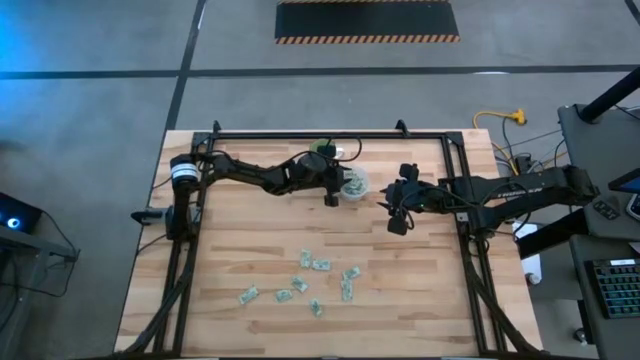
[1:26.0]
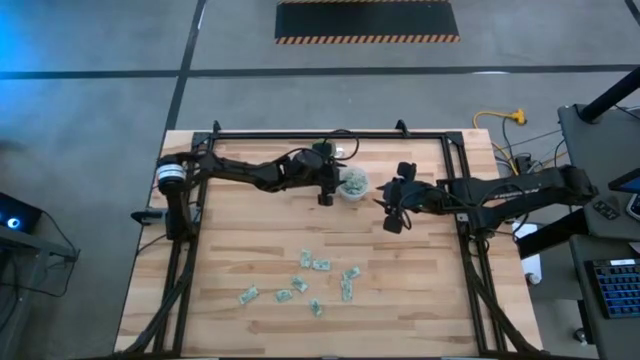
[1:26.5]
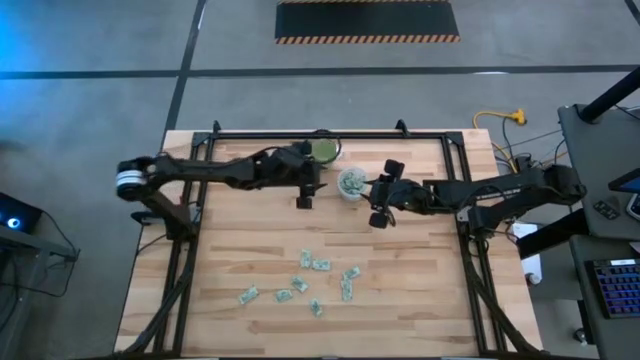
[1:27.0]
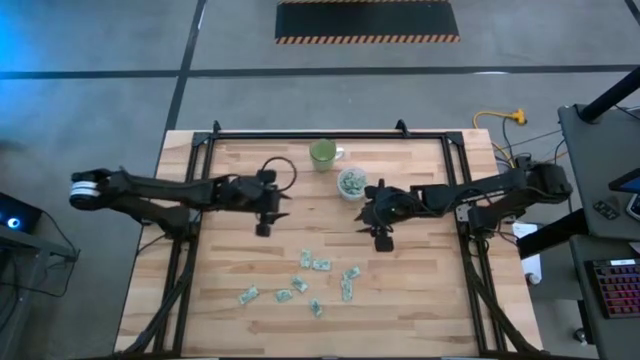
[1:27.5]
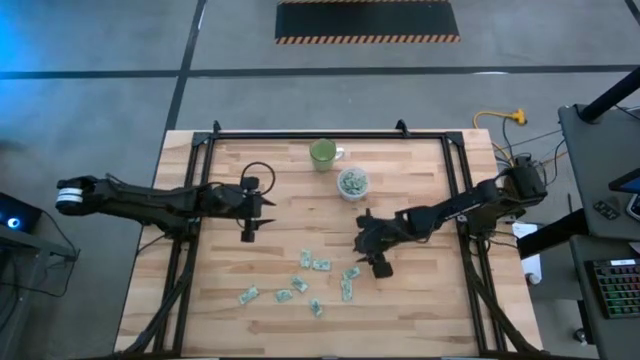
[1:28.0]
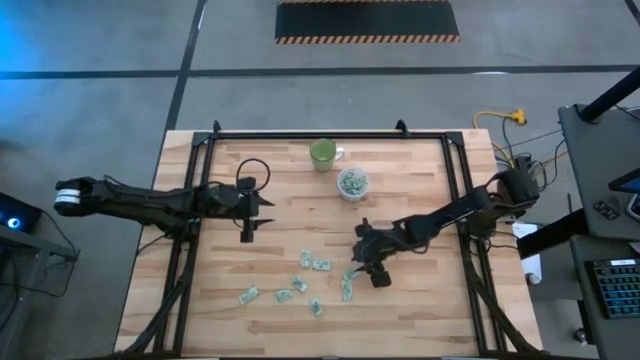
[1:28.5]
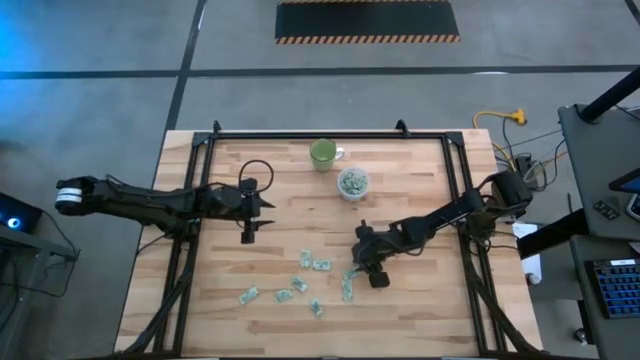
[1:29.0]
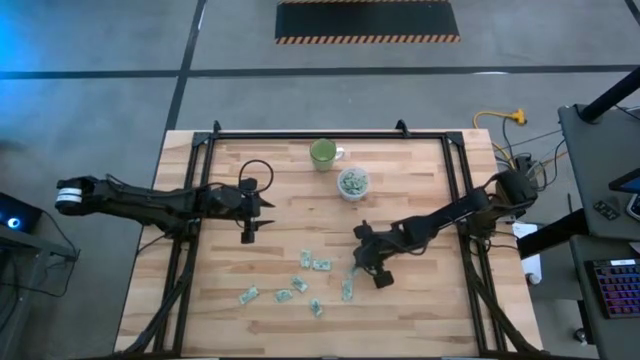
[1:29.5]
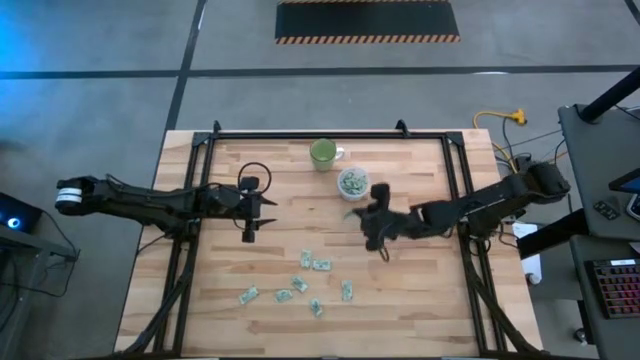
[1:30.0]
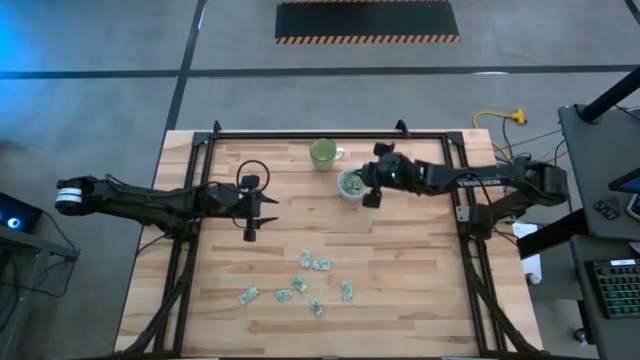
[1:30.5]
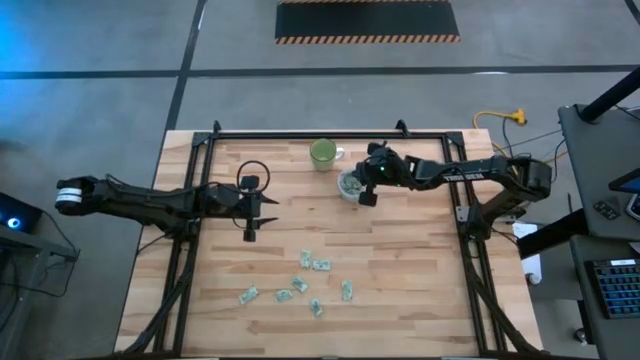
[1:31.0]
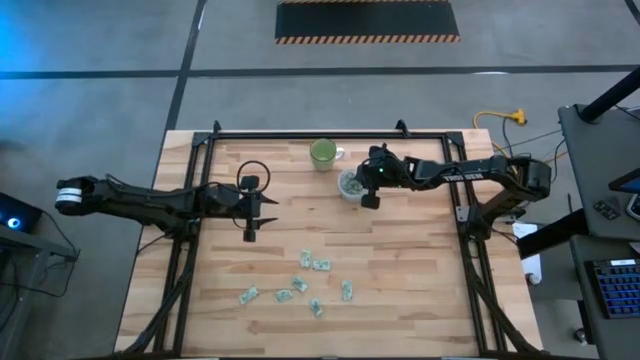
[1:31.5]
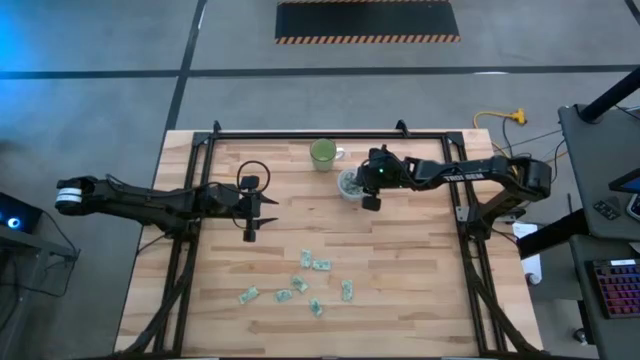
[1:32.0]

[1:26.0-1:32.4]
Task: Pick and place Stevia / Truvia into bins
Put the stevia packet into the transparent container

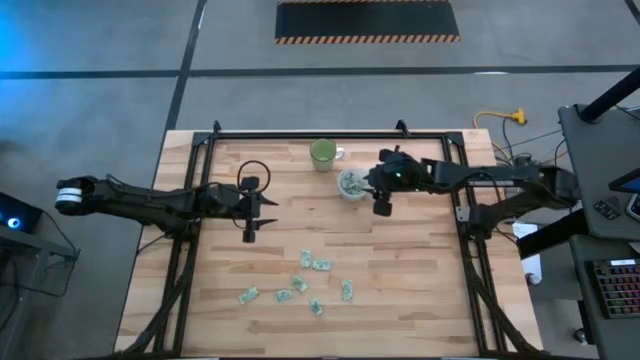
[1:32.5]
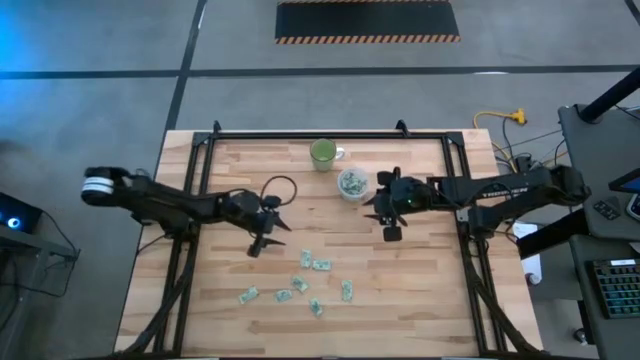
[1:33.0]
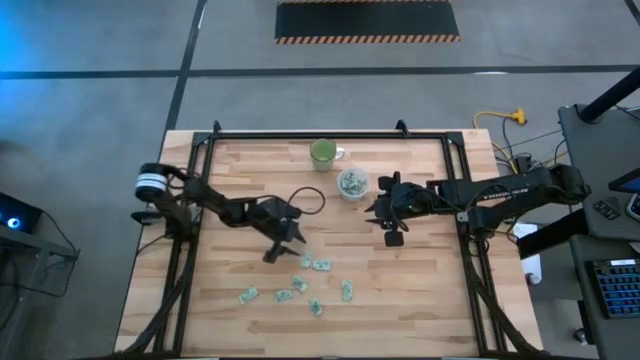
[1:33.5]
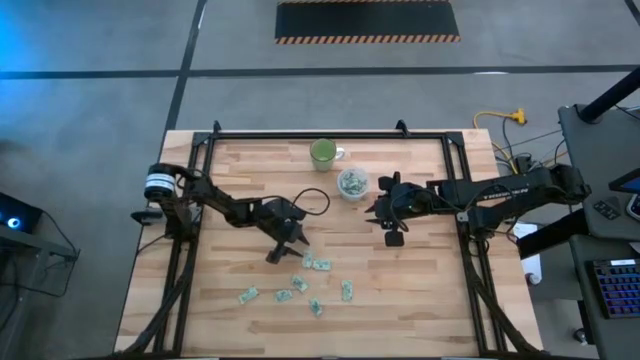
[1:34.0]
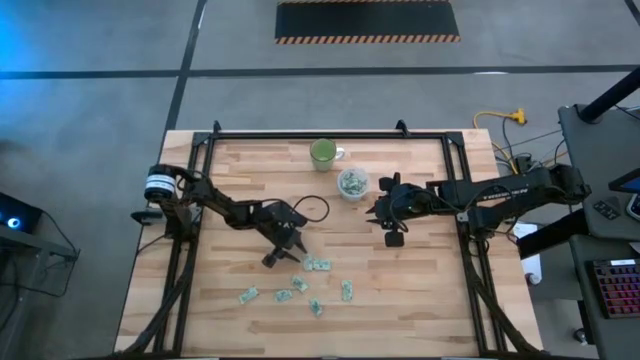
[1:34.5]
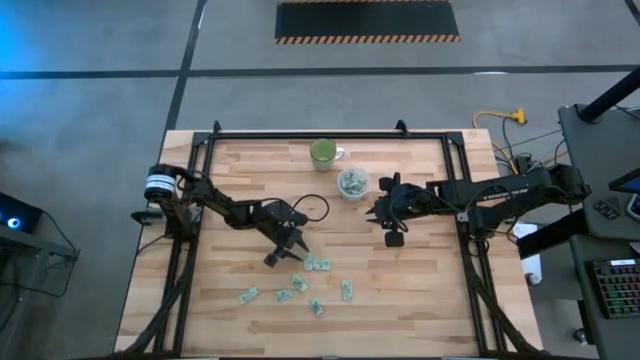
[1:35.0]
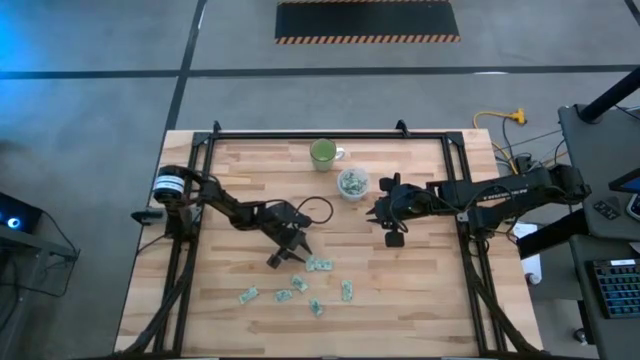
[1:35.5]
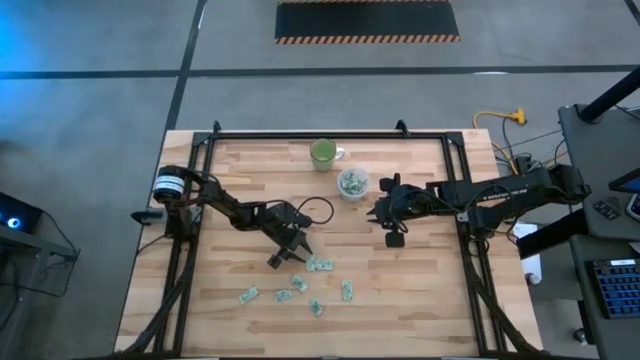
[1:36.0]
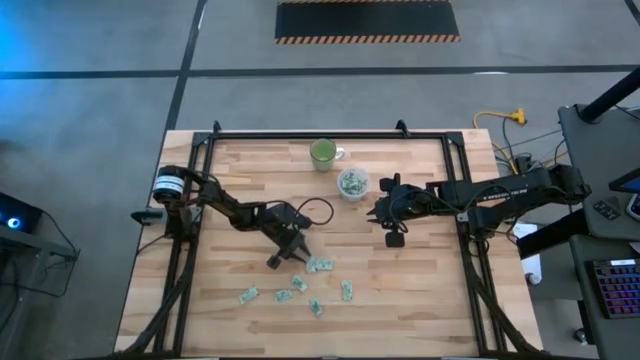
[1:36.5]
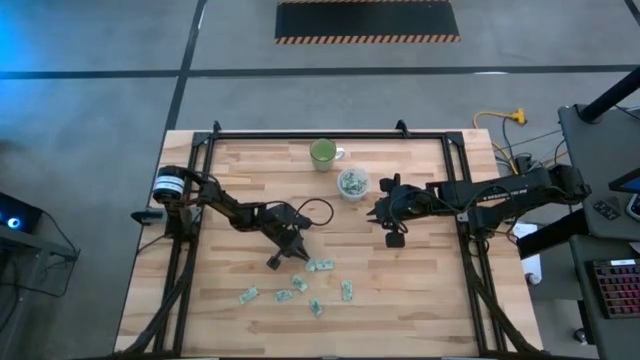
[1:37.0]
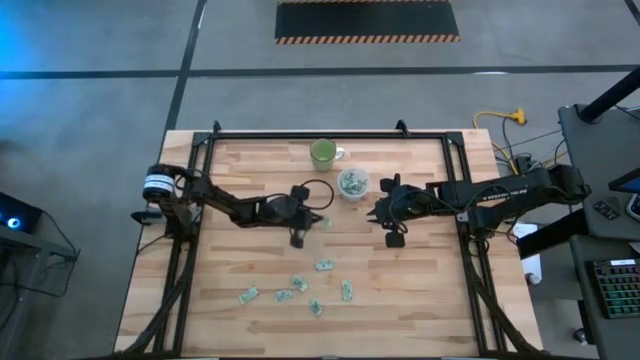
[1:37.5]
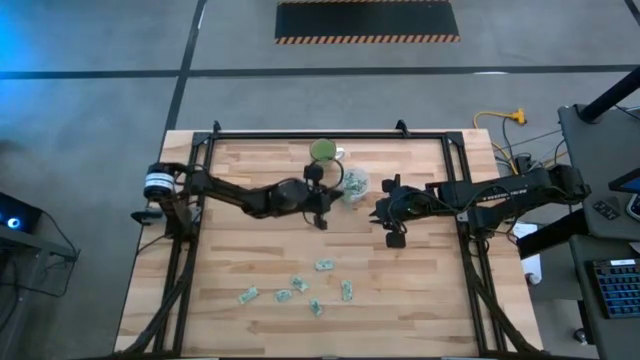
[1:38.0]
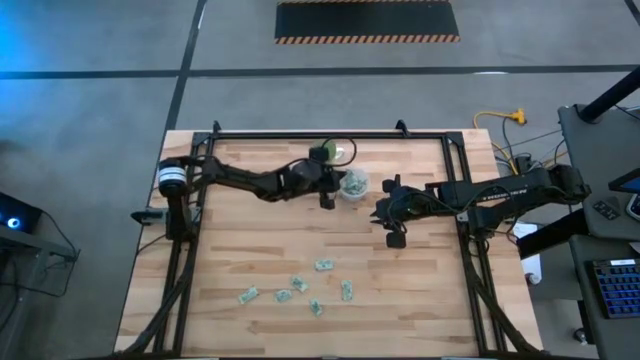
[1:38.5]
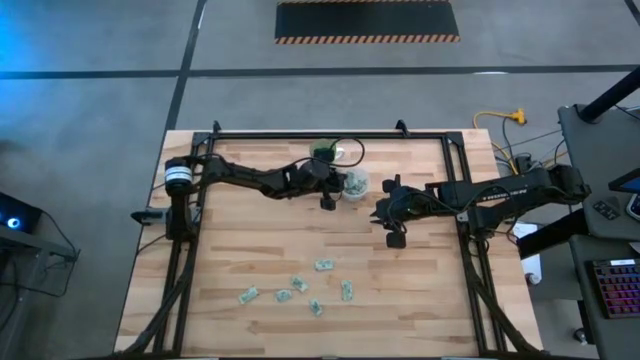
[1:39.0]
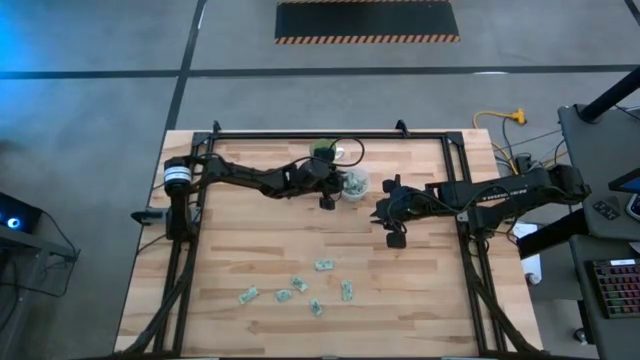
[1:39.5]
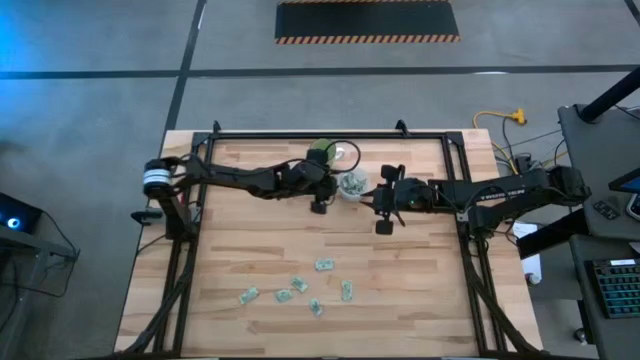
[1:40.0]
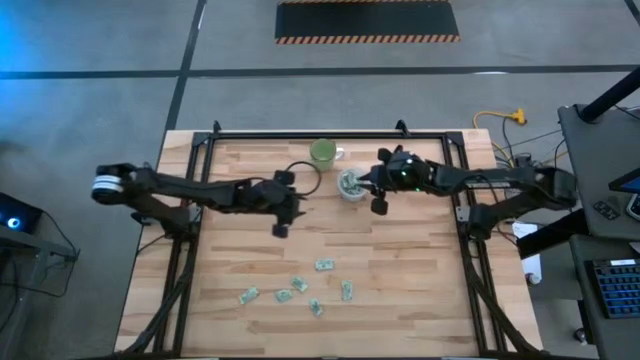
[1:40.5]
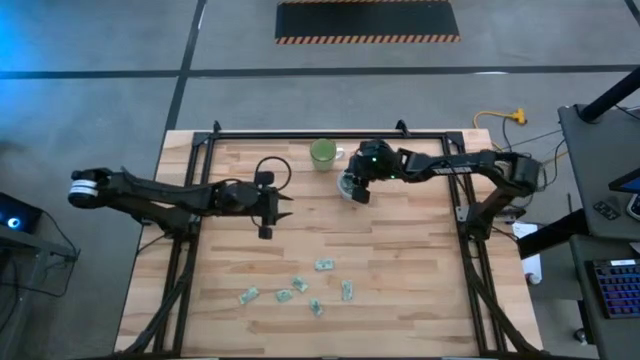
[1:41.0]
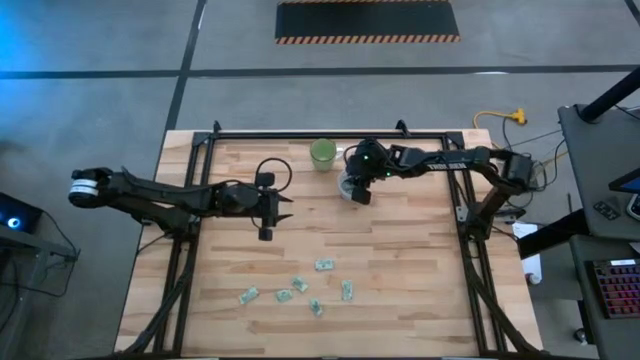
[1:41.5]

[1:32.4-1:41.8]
Put the stevia packet into the transparent container

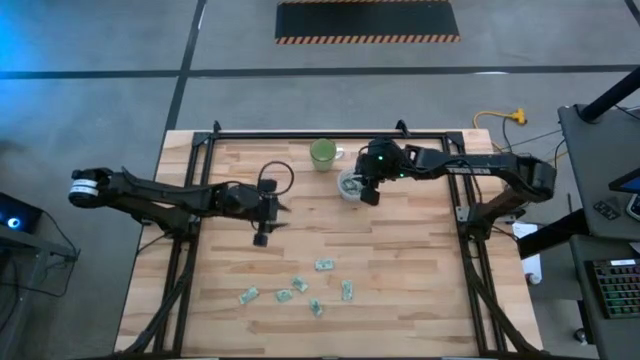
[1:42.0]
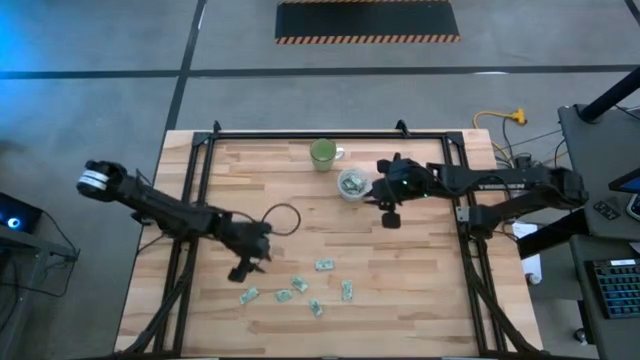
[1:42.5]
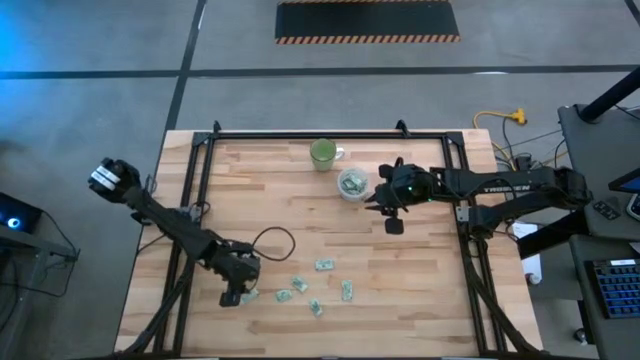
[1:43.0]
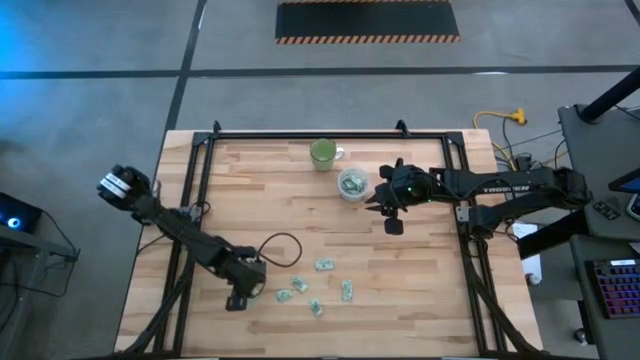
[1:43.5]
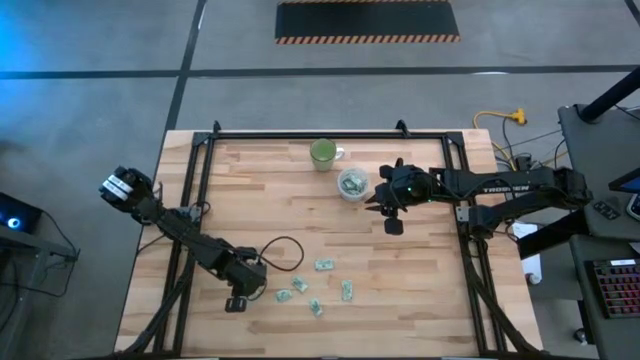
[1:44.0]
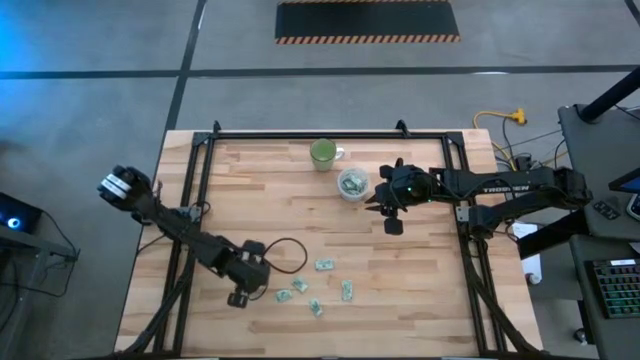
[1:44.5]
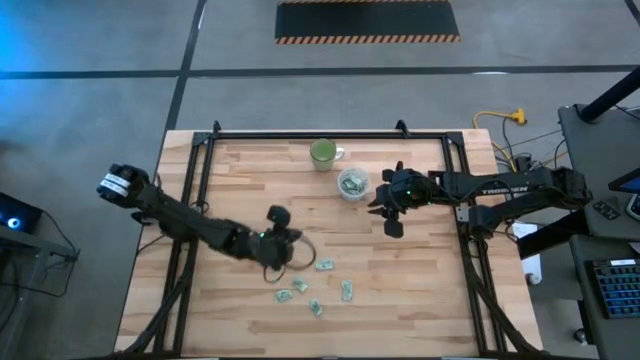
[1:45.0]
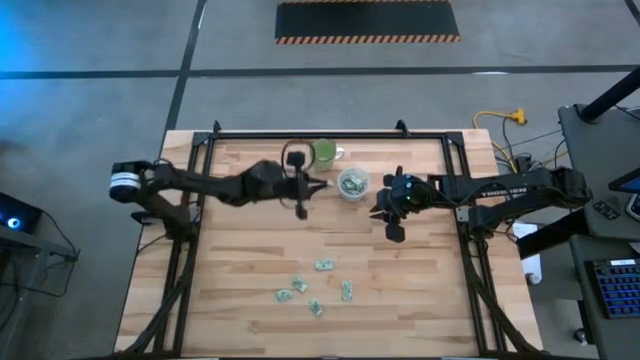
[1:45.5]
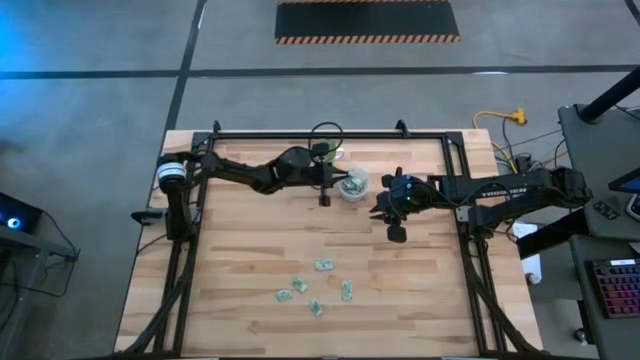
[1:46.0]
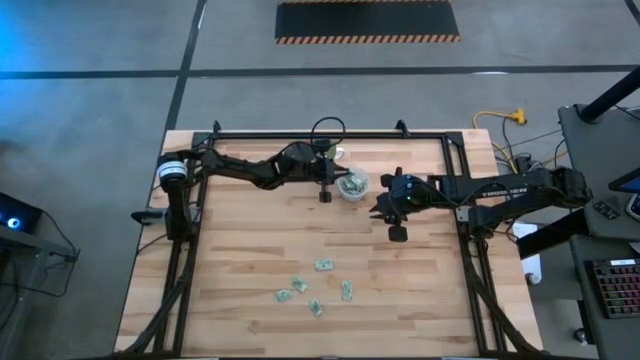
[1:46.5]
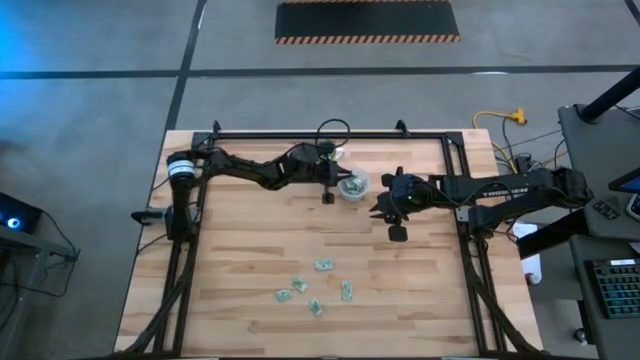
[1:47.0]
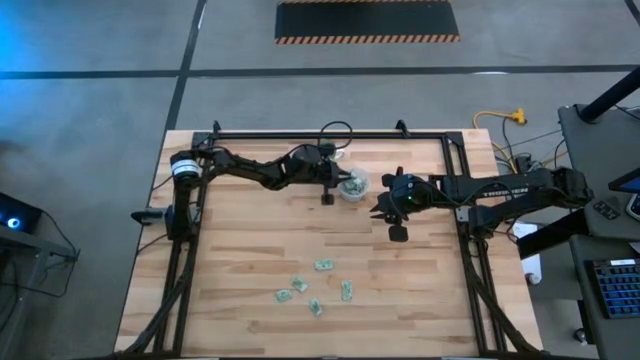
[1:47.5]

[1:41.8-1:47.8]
Put the stevia packet into the transparent container
